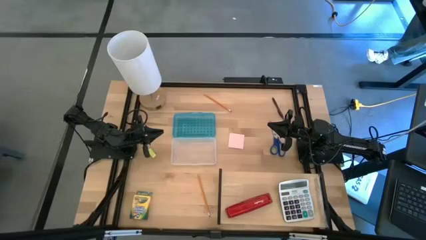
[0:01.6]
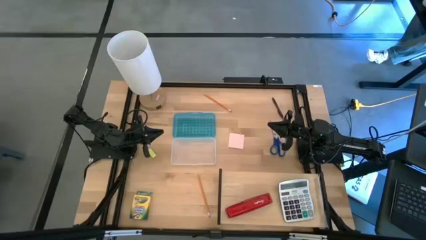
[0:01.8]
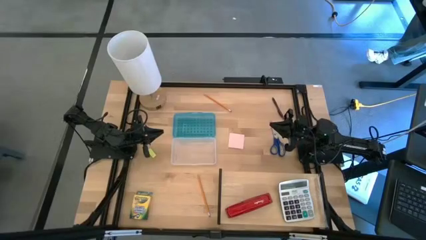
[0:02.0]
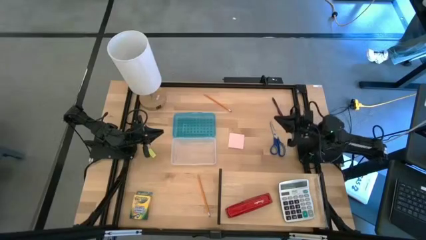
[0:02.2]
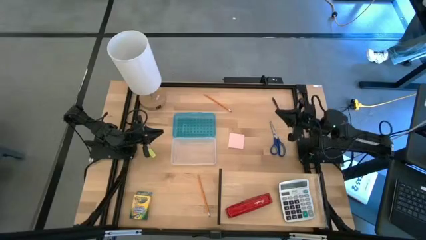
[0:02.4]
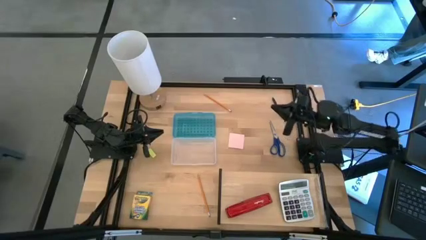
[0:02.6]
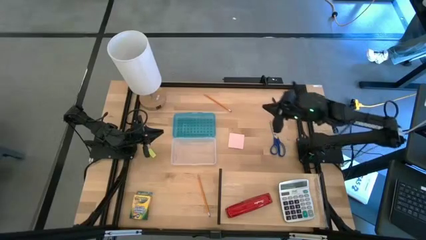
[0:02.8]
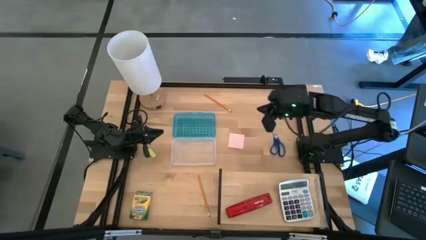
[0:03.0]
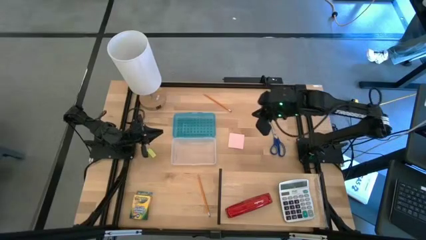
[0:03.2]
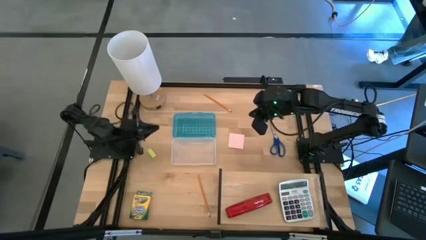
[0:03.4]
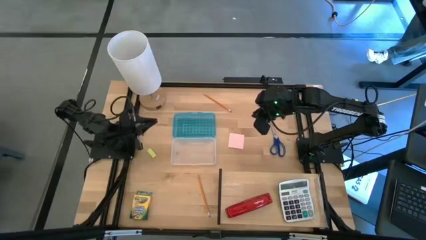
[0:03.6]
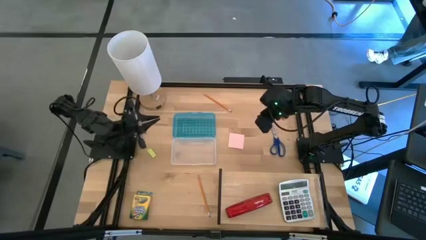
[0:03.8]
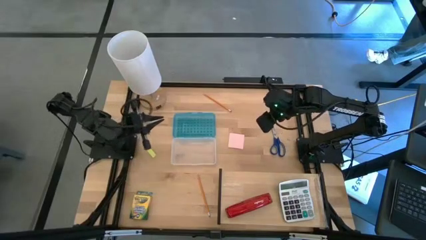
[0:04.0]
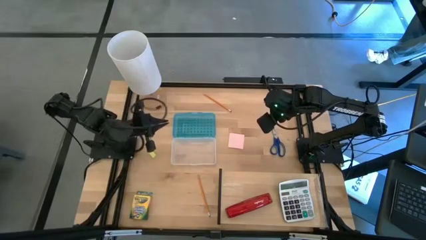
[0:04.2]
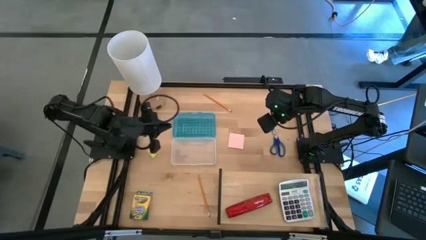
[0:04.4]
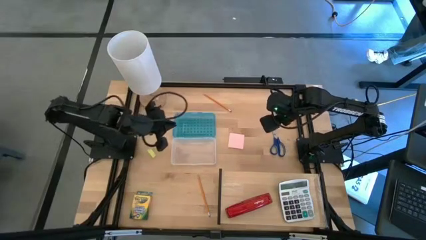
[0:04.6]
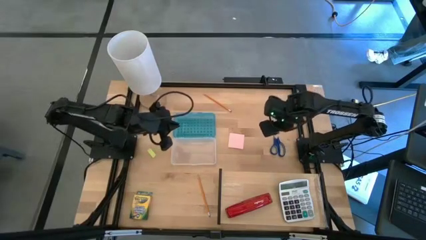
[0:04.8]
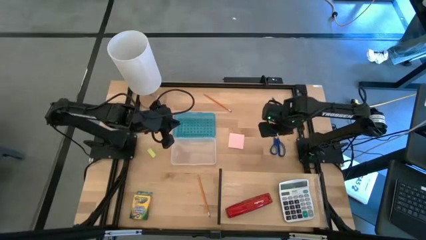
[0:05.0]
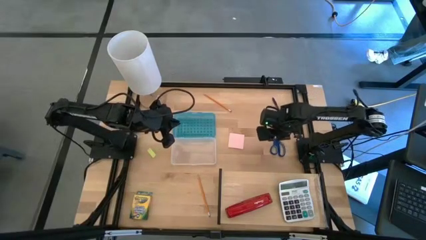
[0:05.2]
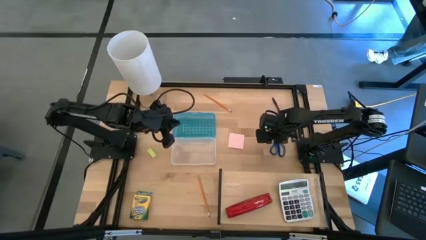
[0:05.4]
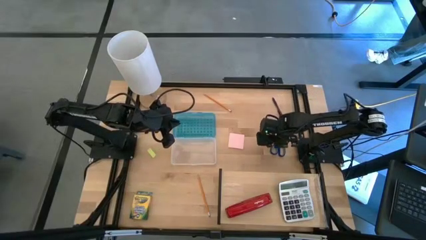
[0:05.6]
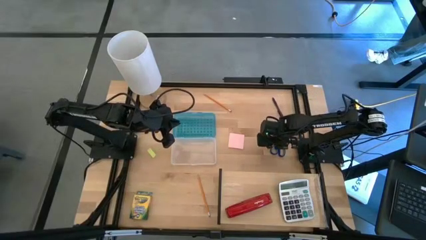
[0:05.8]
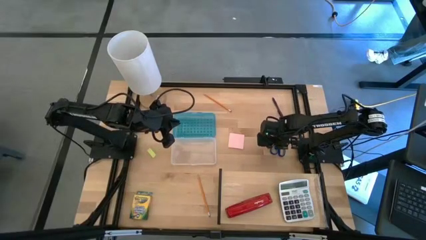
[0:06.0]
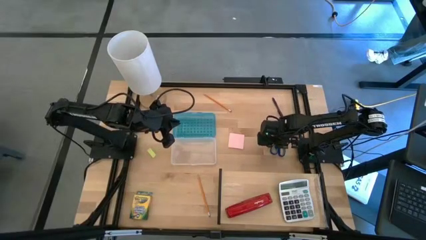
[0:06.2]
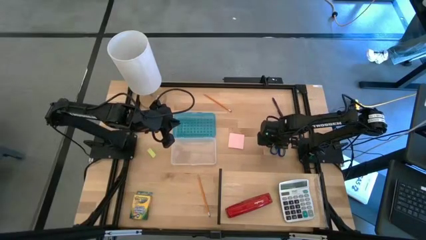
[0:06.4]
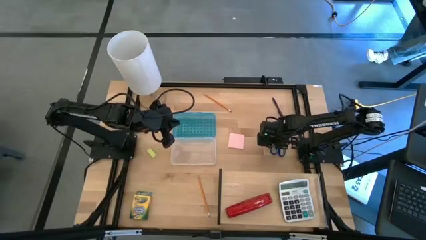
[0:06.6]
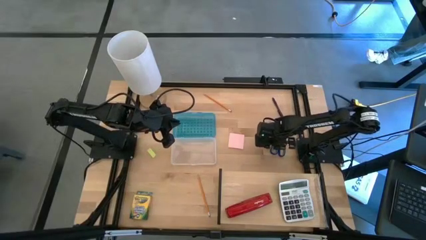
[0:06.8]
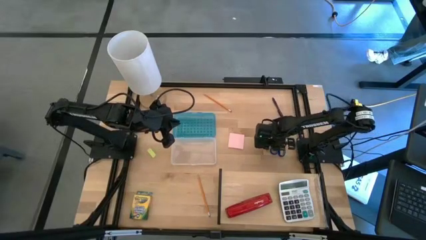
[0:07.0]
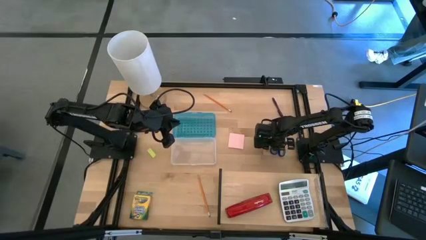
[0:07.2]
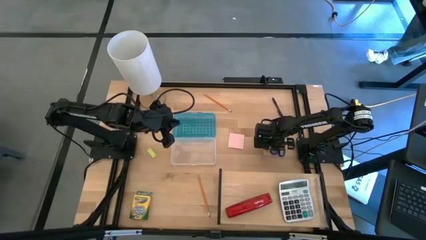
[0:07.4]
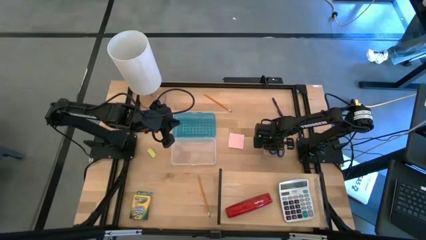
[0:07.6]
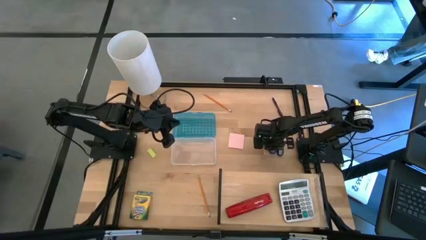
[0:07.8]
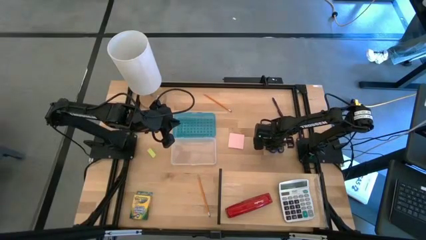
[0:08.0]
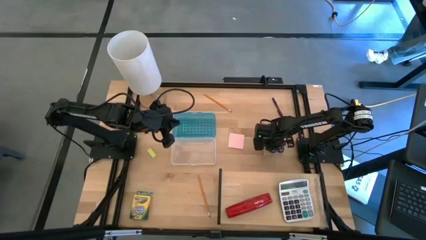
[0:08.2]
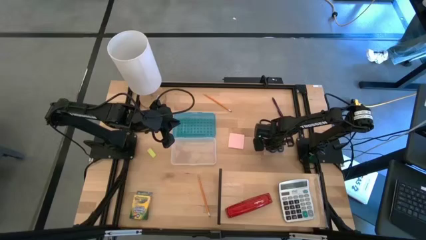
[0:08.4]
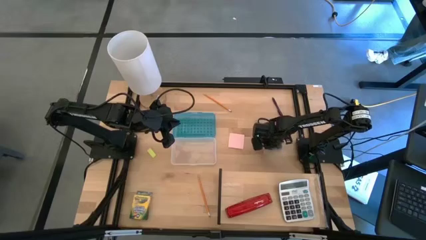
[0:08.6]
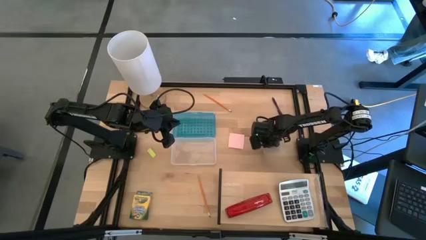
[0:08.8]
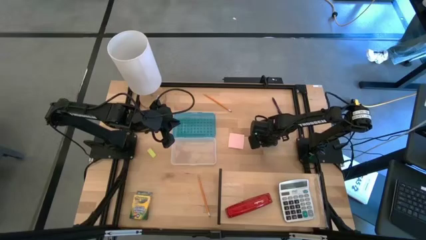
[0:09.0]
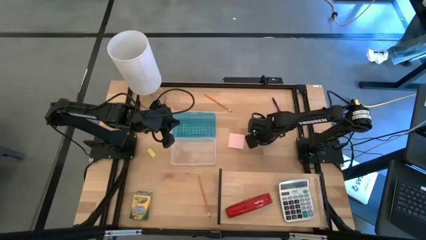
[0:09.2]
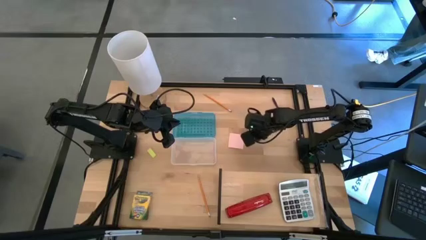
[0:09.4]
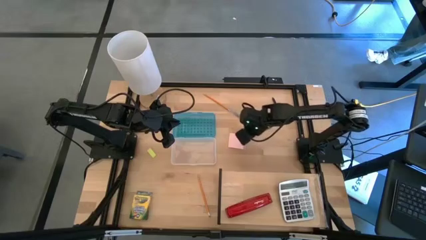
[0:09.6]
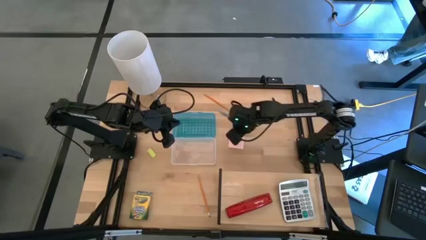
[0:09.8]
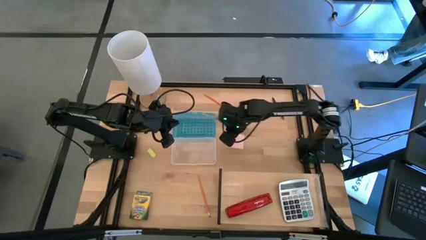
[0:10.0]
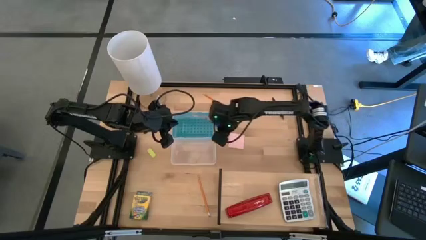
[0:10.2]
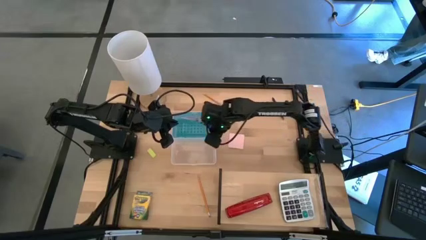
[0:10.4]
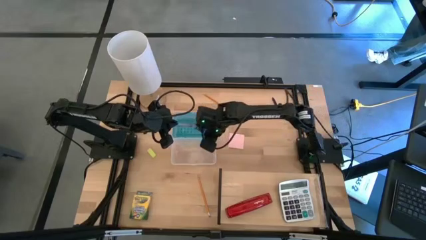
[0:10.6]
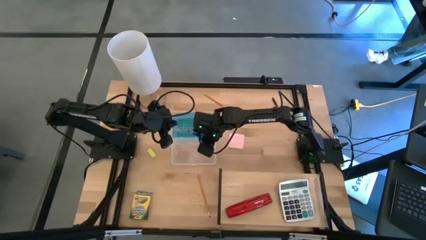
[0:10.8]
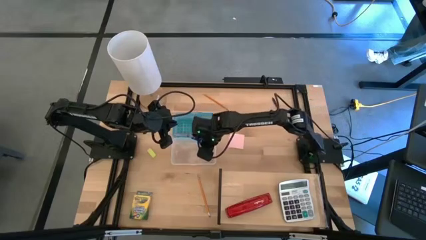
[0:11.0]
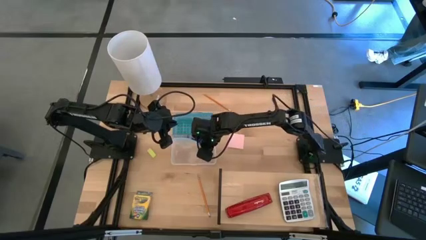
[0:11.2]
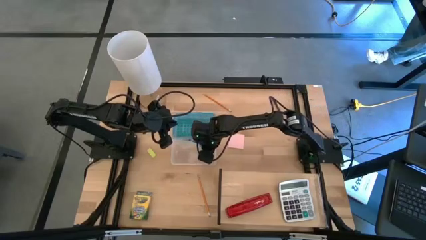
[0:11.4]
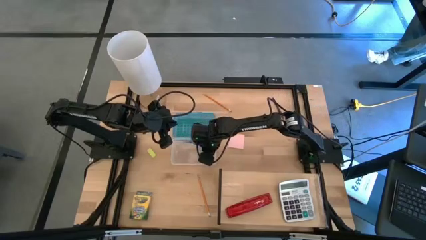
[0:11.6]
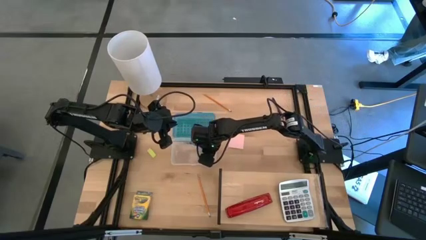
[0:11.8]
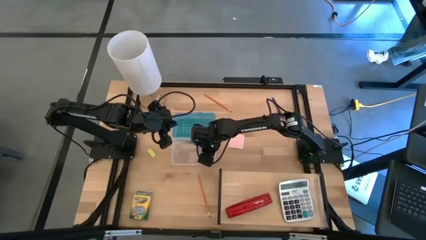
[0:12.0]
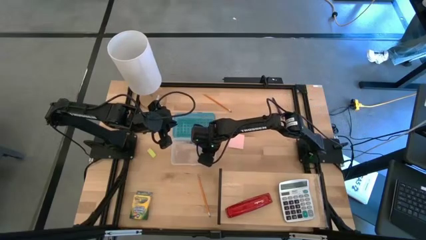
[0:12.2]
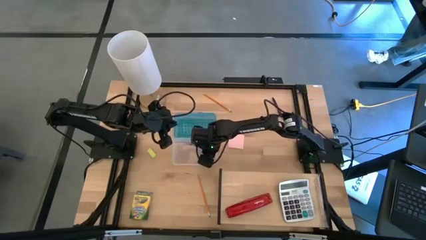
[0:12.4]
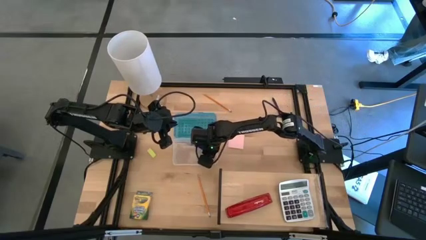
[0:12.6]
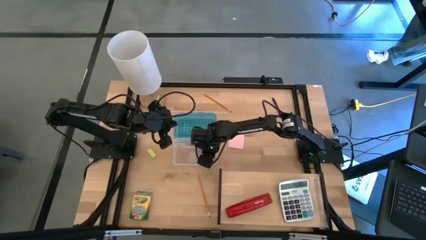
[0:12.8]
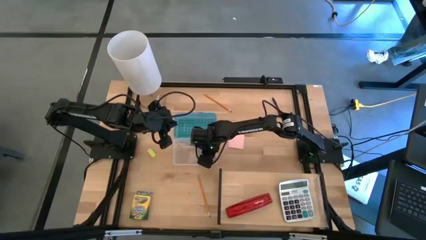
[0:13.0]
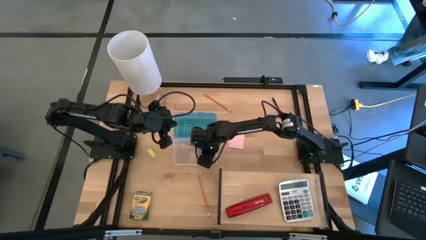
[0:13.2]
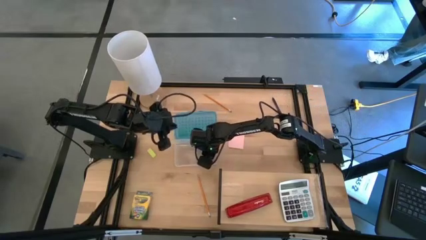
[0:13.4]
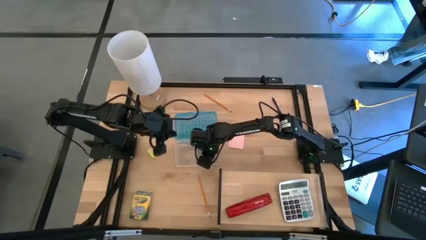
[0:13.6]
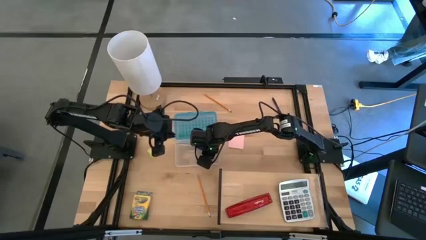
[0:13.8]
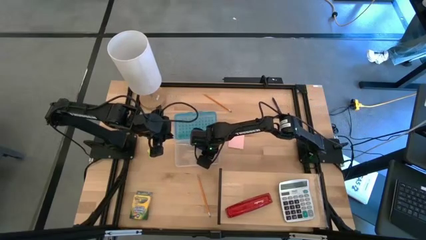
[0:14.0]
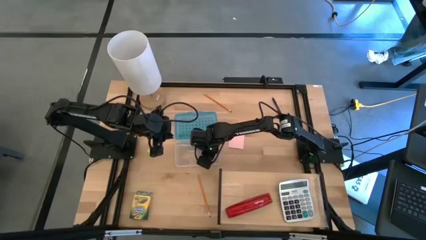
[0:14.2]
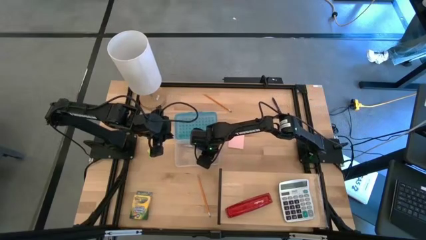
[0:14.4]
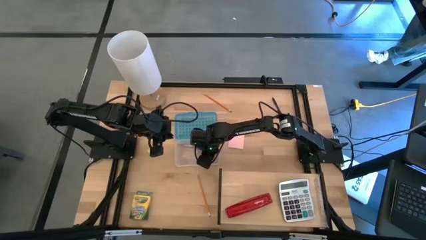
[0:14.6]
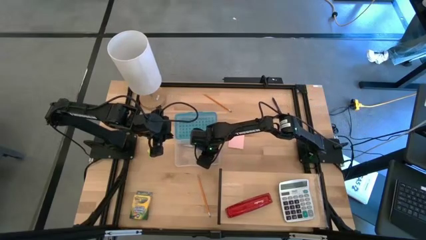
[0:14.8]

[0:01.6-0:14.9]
Task: Pack school essentials
Put the blue scissors into the blue supply box

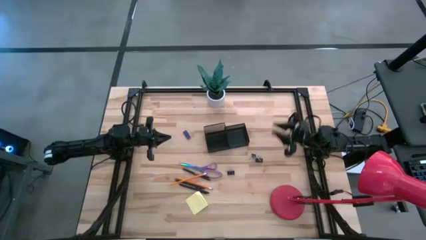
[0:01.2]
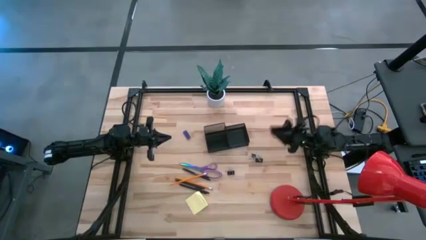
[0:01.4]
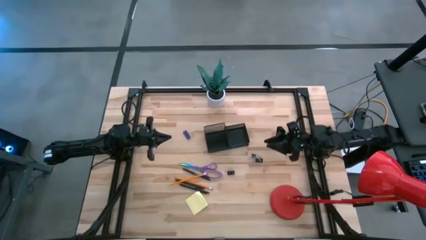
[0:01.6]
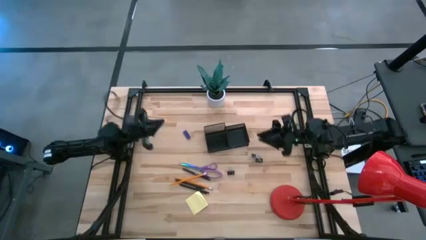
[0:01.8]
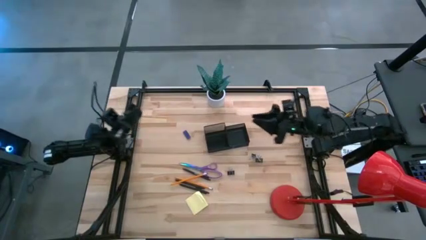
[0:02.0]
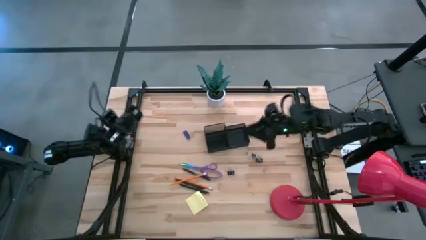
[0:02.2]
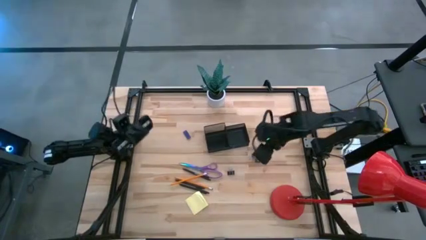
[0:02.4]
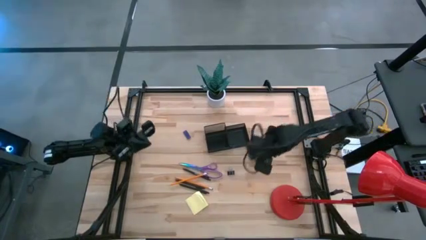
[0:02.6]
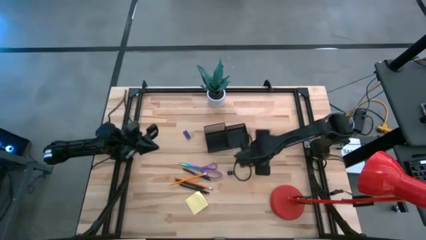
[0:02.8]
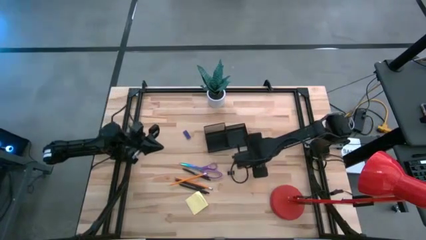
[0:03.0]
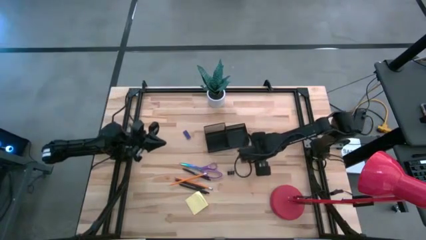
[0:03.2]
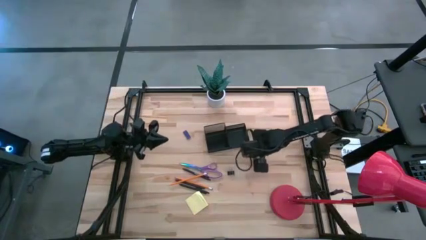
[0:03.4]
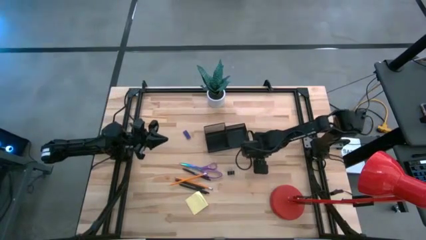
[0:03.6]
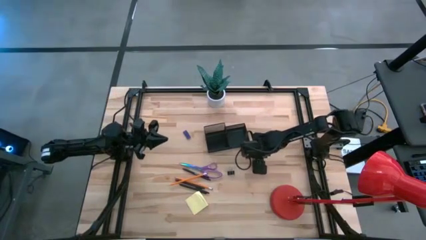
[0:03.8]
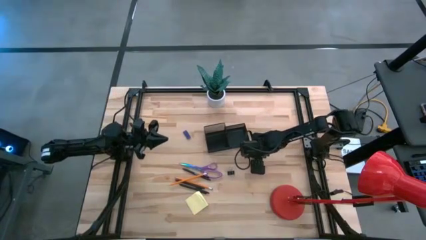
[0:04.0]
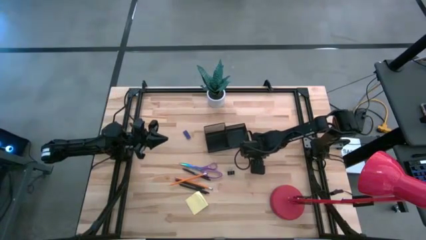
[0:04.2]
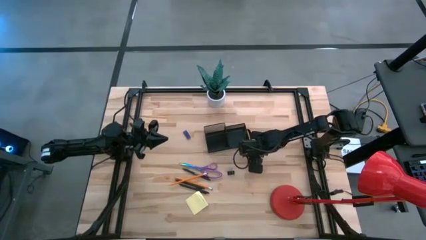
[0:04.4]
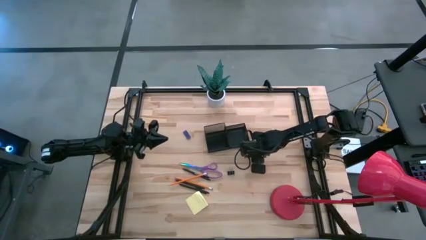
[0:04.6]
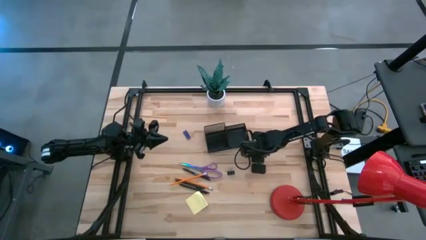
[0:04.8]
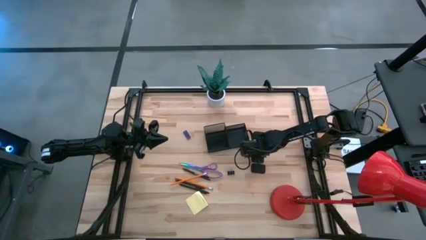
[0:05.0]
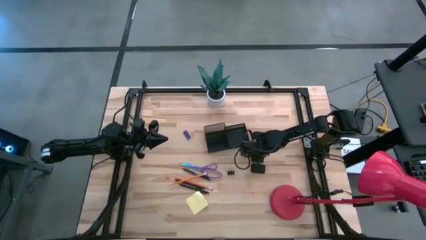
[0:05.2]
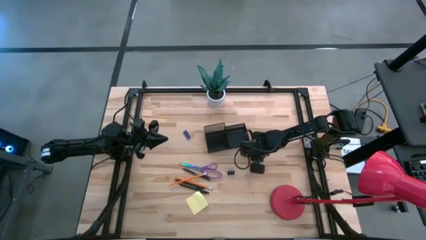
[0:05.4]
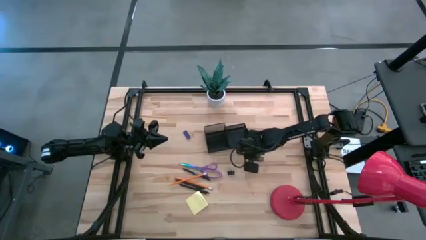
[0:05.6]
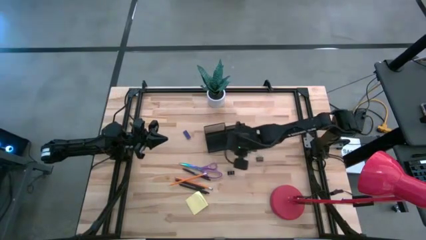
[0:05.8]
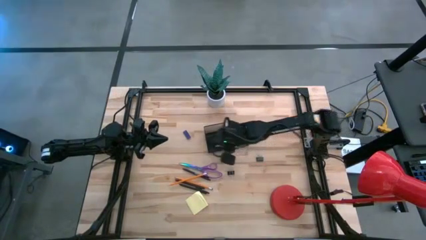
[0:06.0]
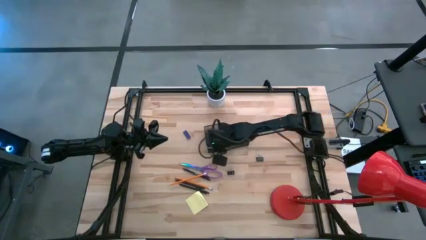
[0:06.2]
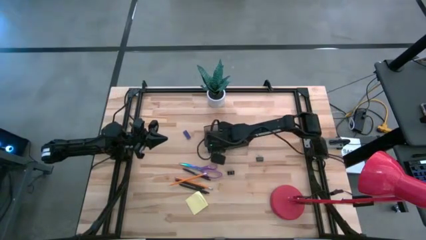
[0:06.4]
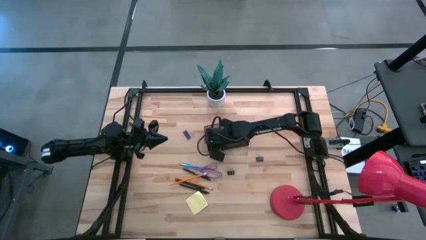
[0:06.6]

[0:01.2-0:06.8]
Task: Pick and place office supplies into organizer
Put the top right black clip into the black organizer
